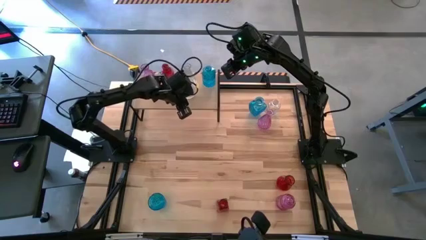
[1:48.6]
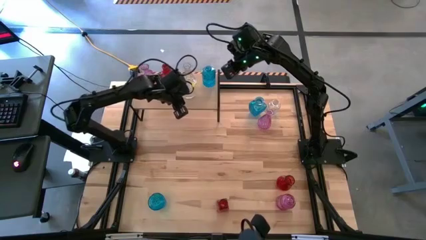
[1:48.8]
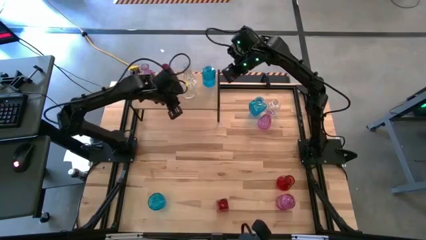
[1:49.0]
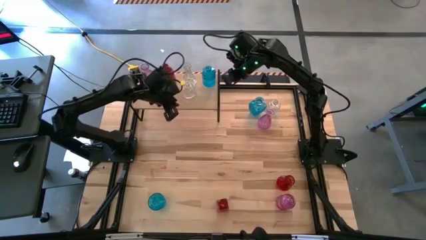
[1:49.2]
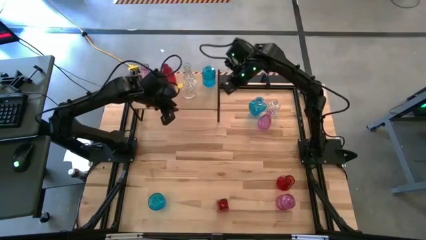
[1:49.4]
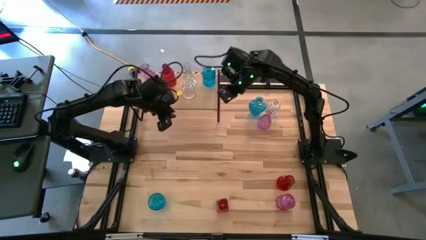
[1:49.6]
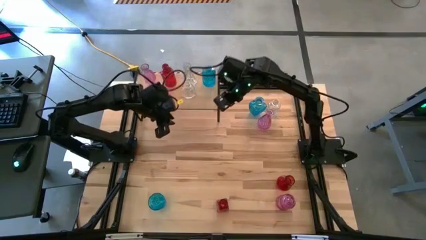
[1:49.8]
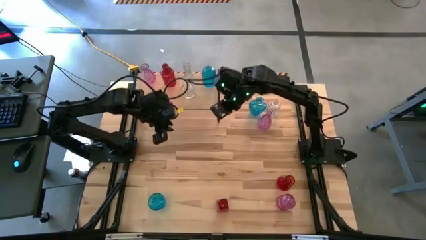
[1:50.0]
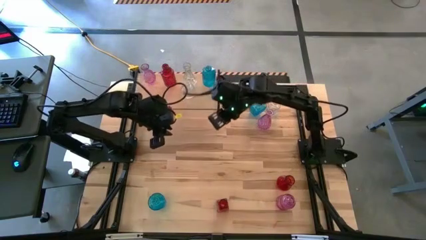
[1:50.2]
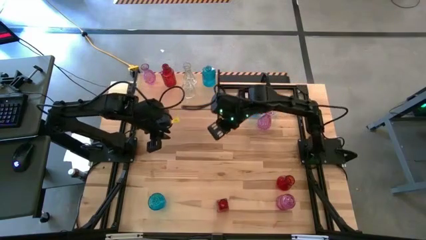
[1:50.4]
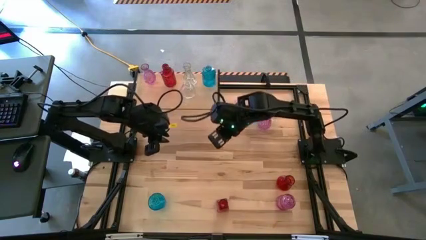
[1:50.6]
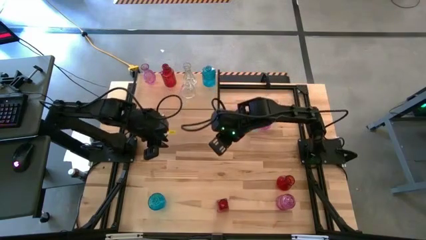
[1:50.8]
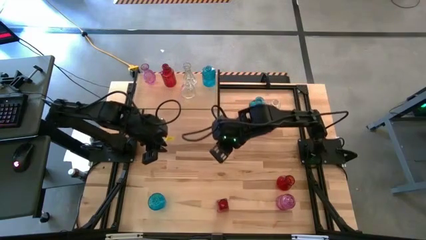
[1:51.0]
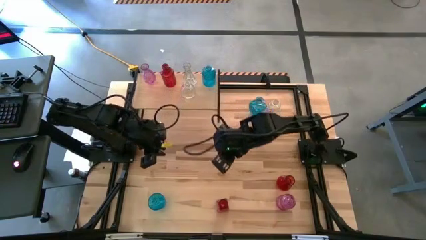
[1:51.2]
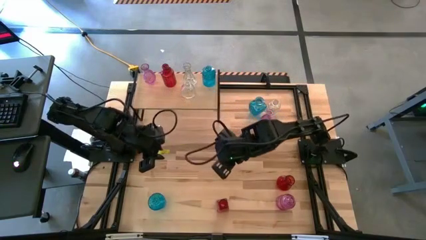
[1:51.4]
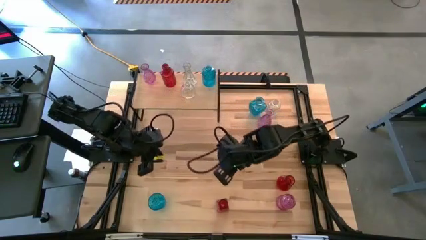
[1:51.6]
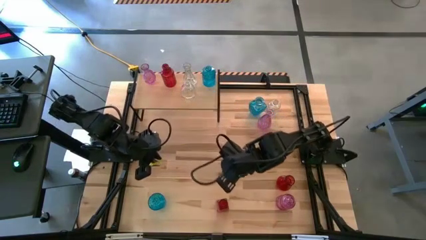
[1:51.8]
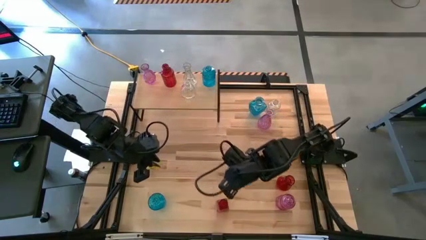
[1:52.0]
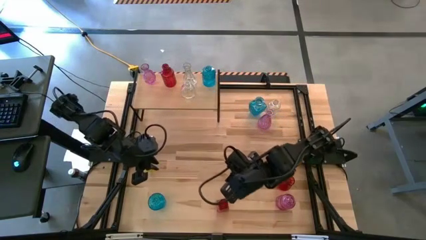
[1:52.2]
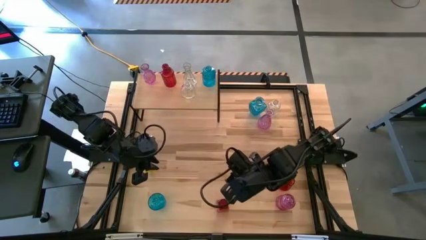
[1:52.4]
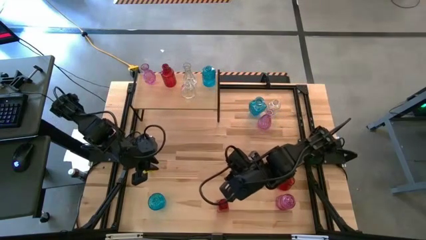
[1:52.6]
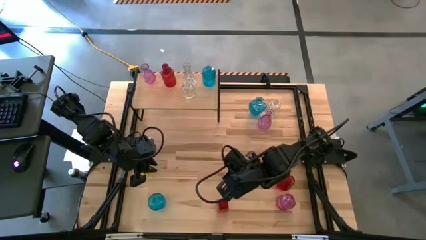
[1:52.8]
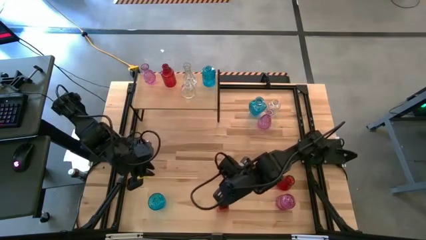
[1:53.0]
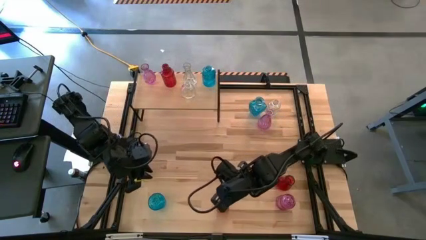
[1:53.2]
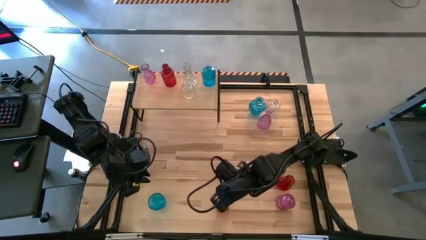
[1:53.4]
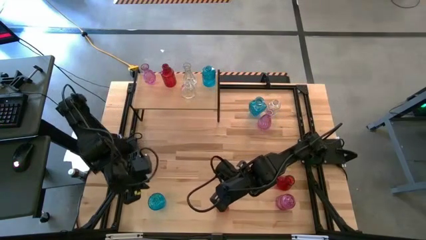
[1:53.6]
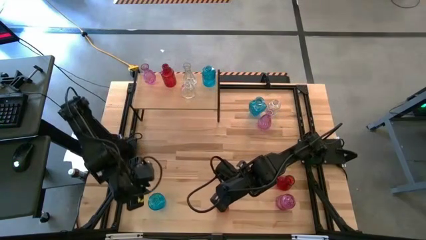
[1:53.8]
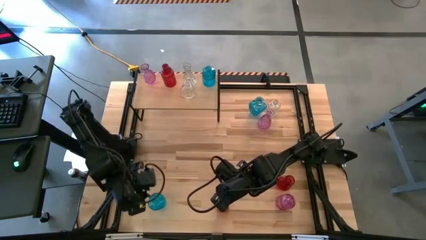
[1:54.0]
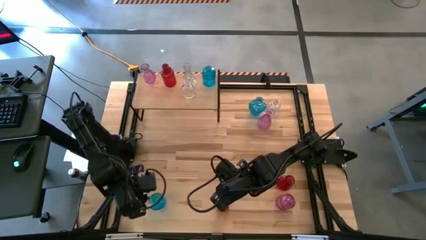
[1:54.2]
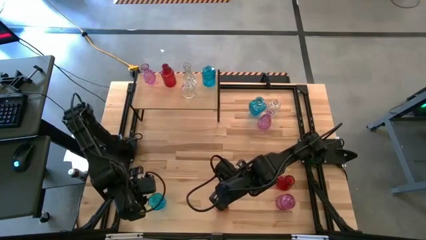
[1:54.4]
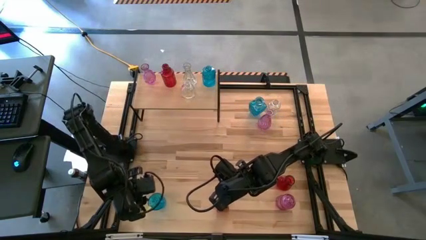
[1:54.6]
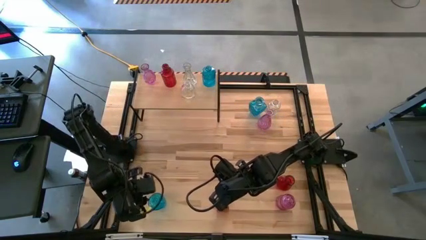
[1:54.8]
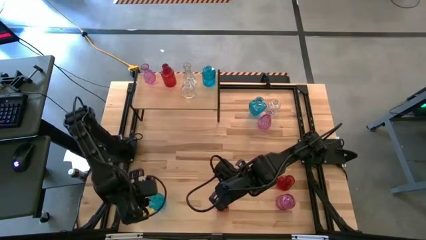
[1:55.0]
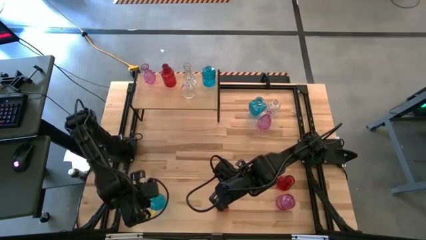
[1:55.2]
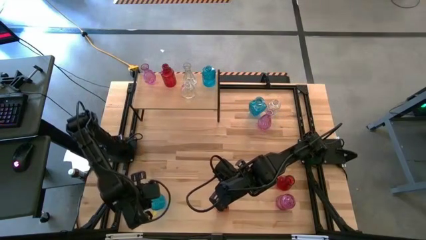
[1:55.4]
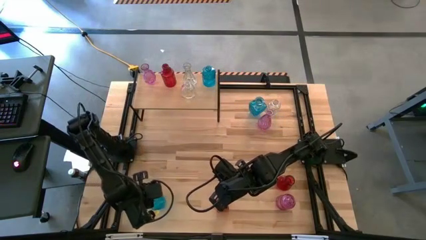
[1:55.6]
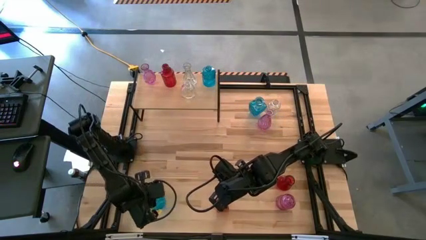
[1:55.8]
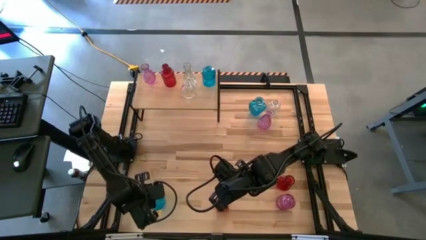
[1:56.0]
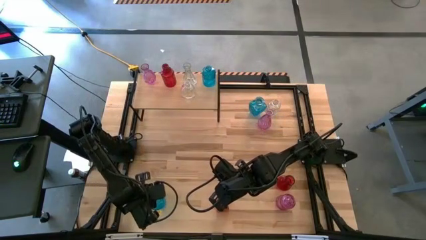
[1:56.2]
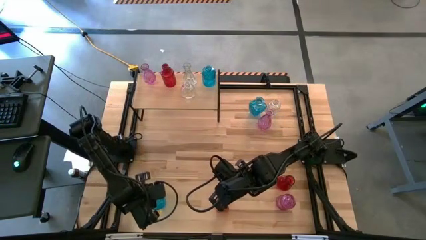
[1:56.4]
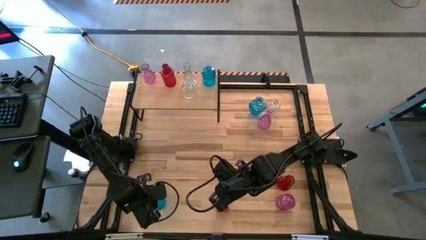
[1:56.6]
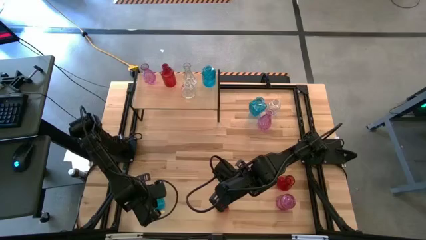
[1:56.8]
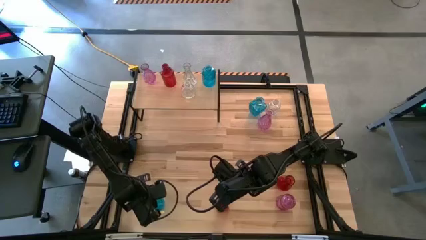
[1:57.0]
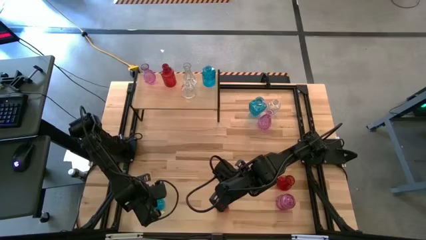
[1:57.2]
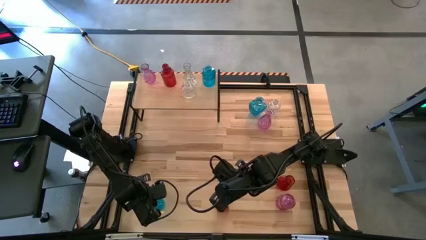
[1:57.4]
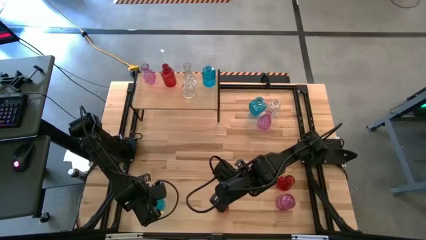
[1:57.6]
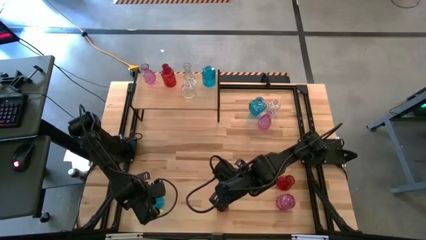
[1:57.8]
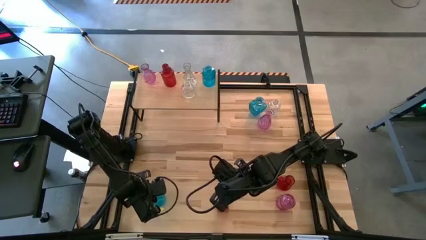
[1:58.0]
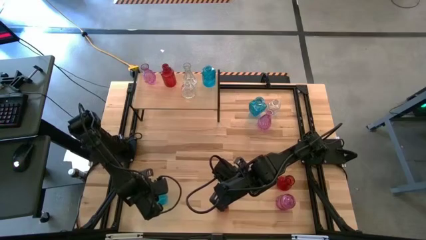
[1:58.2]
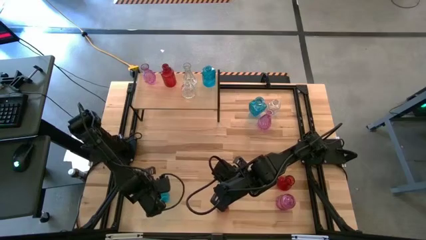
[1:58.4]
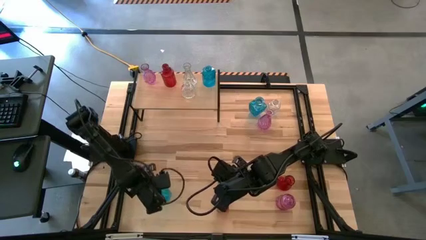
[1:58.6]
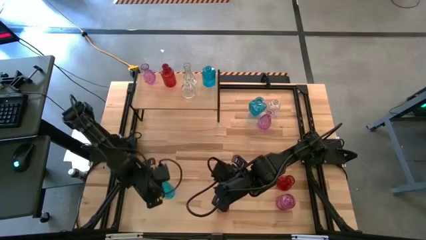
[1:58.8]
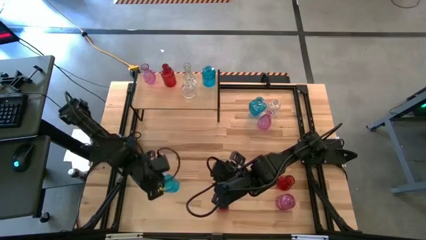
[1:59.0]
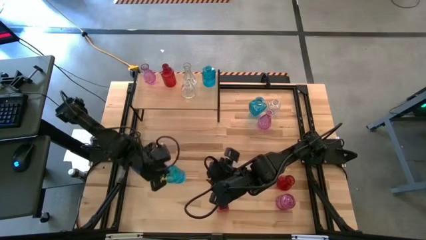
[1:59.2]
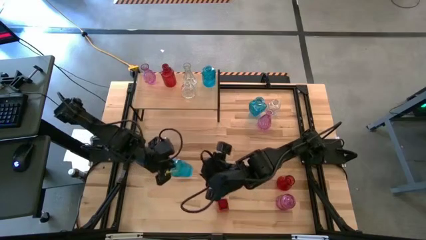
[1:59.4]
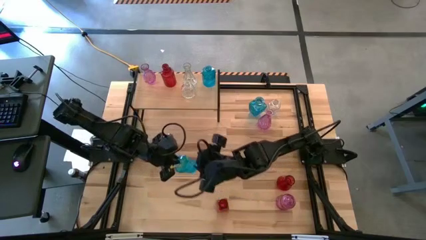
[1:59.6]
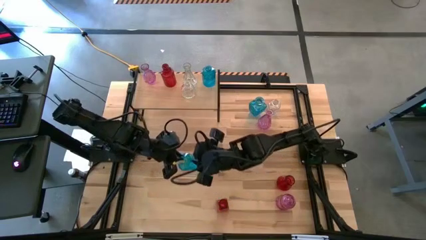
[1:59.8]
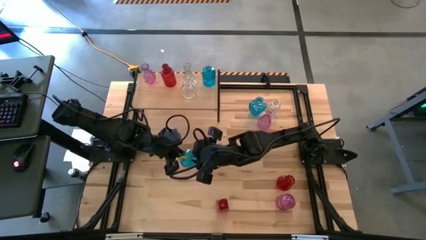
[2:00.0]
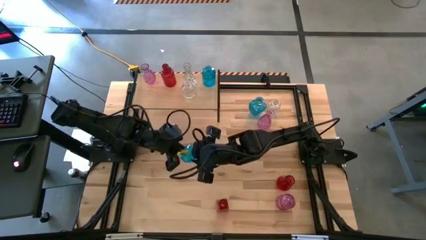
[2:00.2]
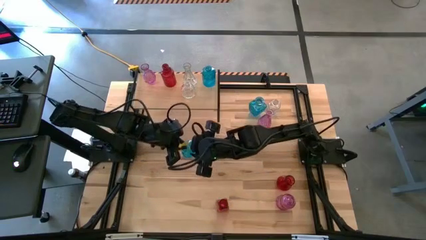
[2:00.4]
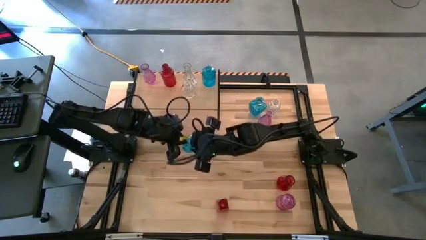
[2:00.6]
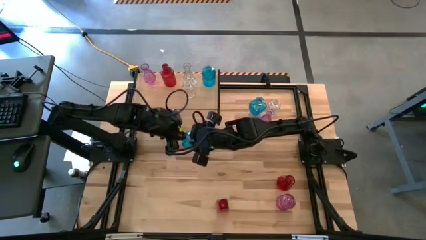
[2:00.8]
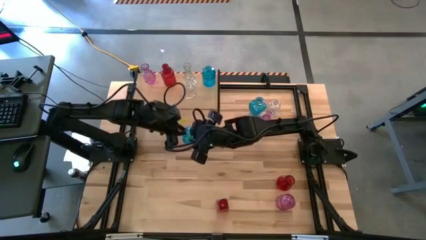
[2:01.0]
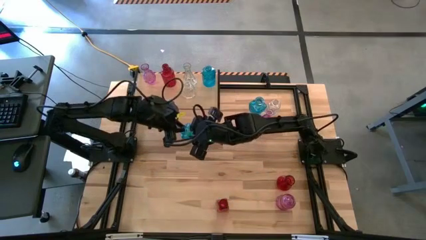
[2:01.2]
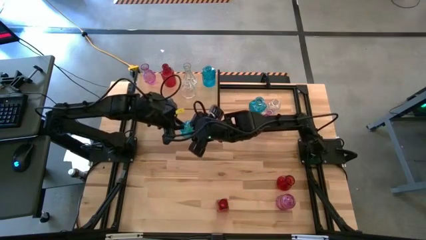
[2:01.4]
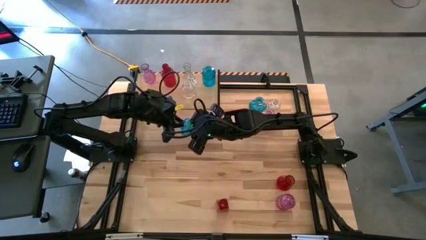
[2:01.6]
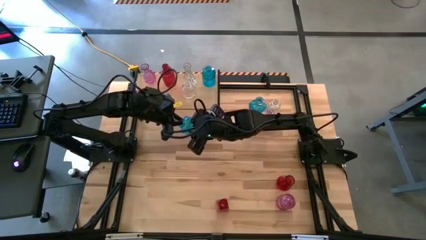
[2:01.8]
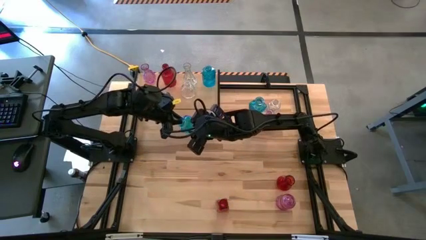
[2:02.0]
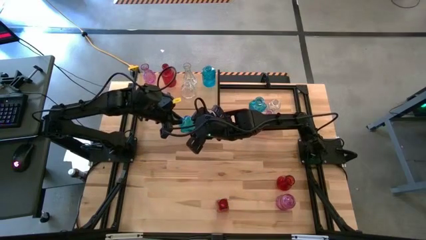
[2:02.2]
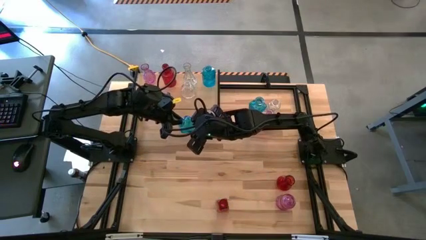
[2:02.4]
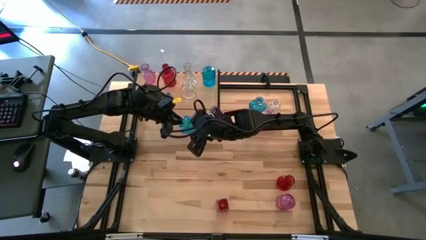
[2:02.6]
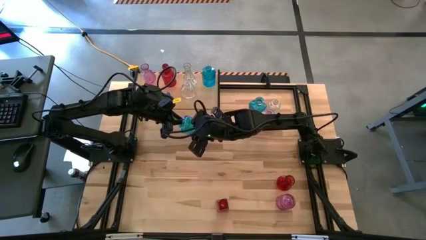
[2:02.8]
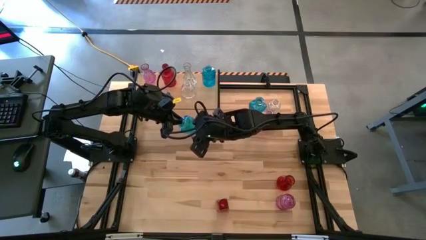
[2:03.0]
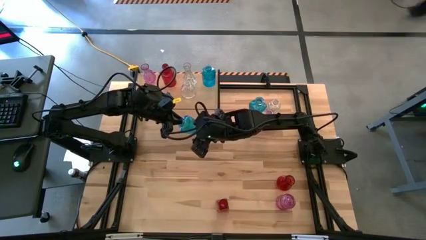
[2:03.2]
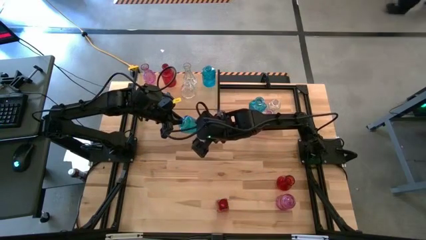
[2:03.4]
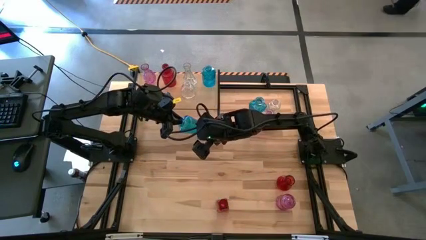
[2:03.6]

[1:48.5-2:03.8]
Task: sort vases onto shelf
Put the bottom blue vase on the shelf aligned with the other blue vase

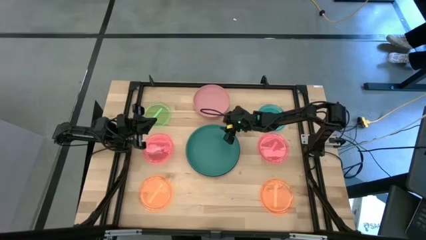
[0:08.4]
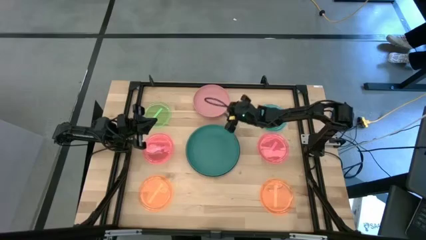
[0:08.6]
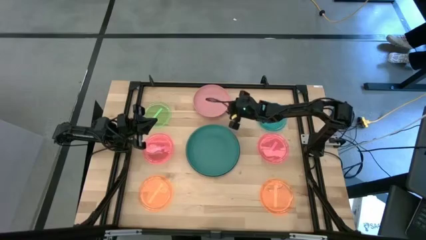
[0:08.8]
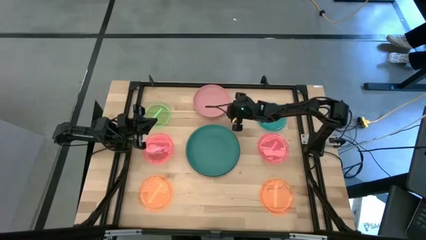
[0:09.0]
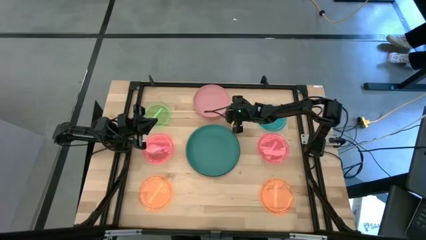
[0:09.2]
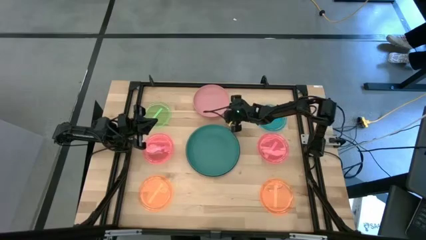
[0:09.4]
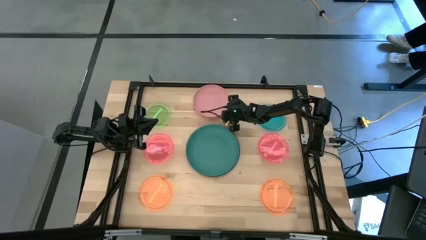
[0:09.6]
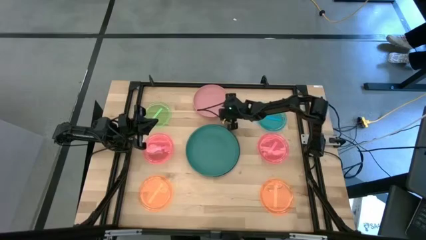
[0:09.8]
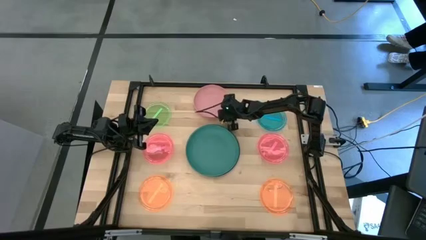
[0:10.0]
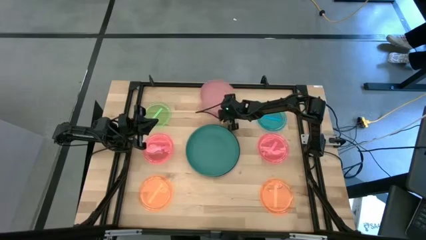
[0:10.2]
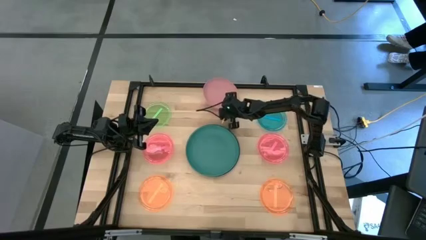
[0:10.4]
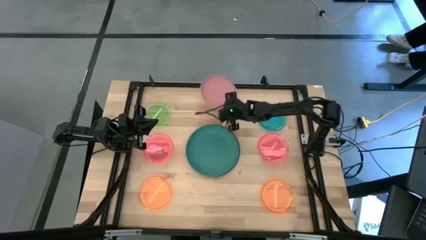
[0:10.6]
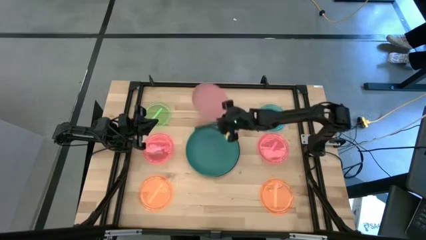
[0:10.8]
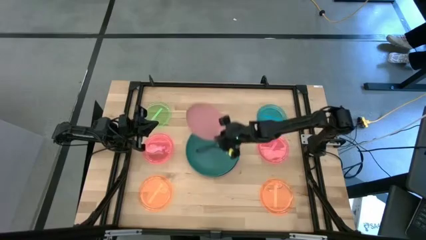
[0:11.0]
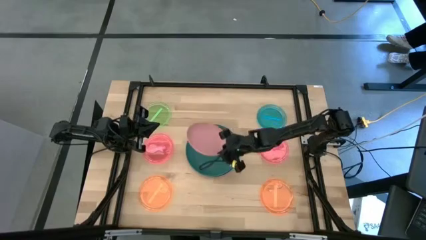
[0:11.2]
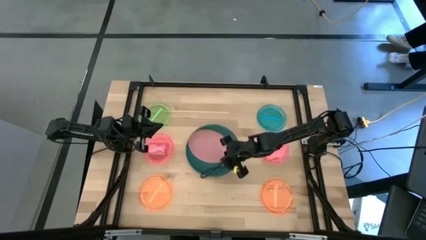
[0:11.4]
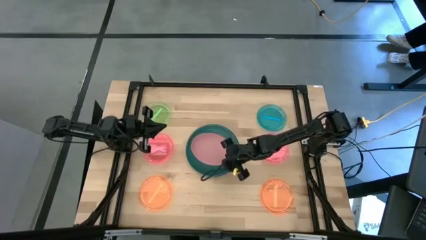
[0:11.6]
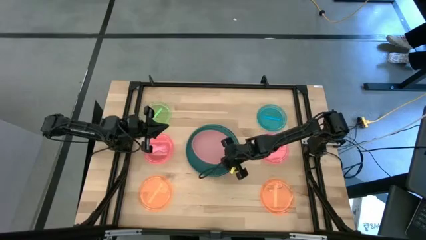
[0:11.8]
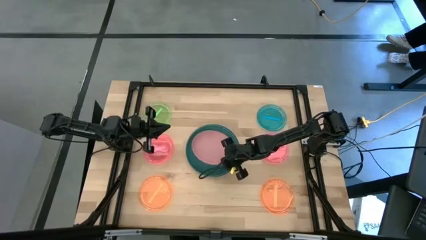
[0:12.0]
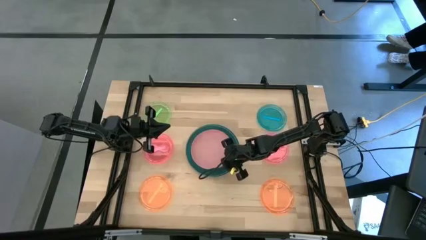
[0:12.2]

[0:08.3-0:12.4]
Task: Stack plastic plates
Stack the pink plate on top of the green plate
